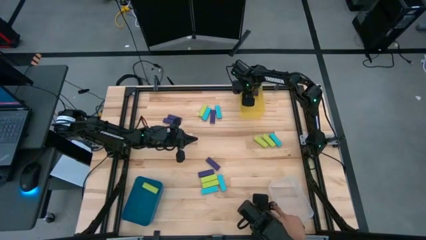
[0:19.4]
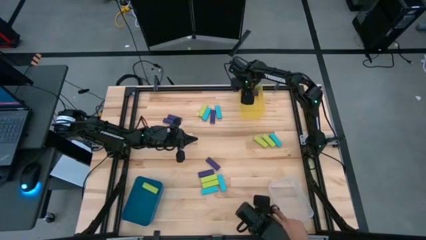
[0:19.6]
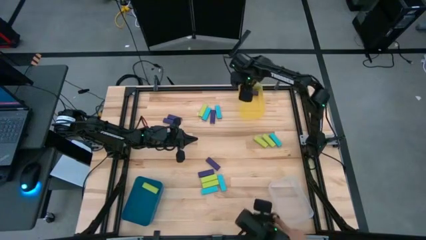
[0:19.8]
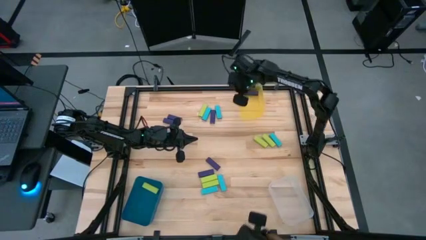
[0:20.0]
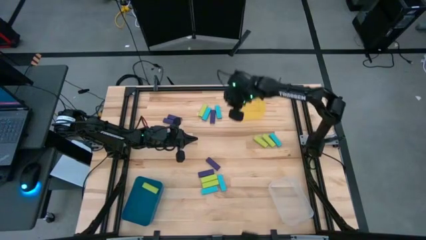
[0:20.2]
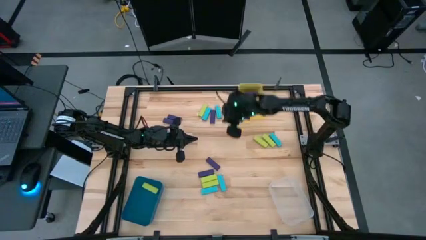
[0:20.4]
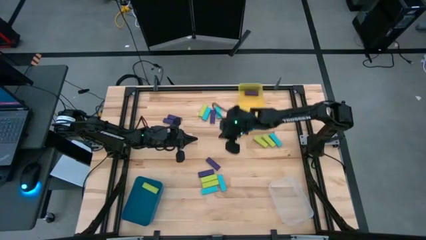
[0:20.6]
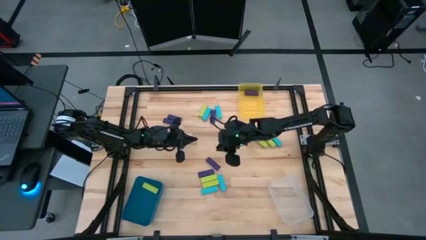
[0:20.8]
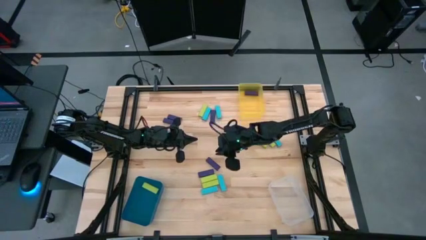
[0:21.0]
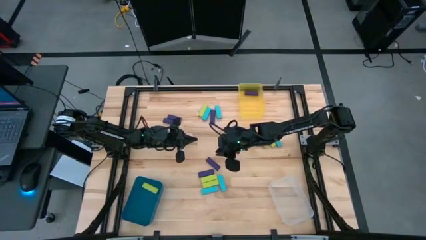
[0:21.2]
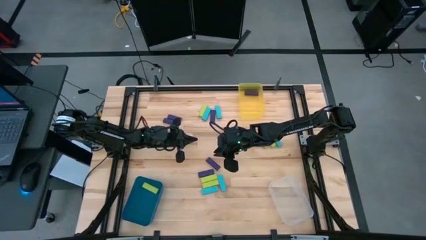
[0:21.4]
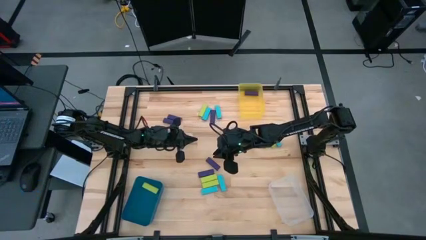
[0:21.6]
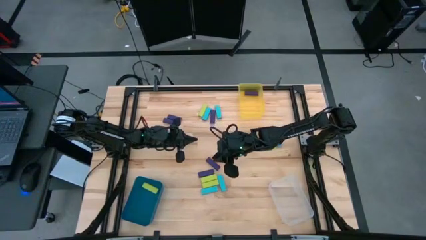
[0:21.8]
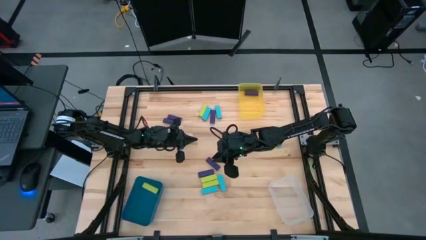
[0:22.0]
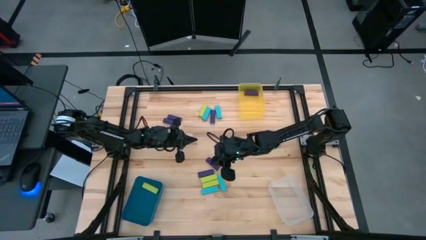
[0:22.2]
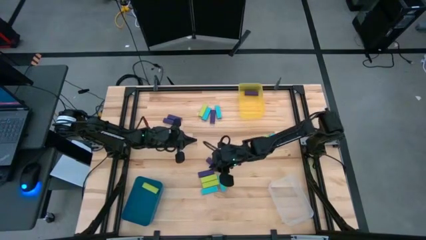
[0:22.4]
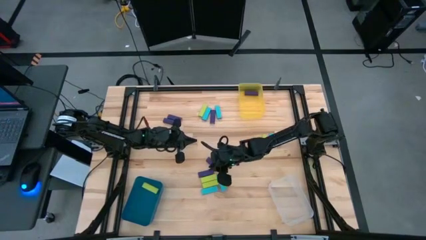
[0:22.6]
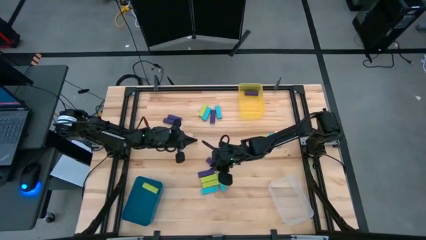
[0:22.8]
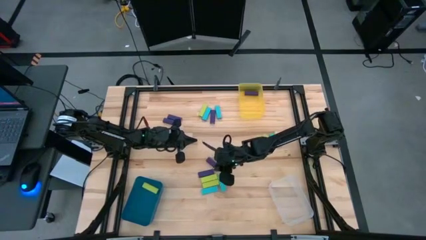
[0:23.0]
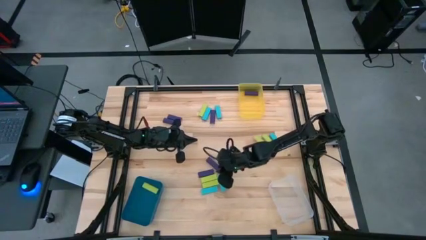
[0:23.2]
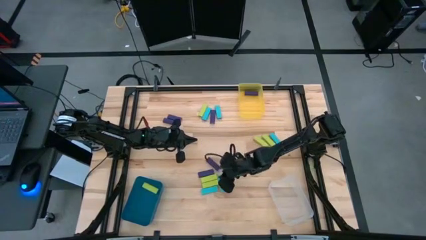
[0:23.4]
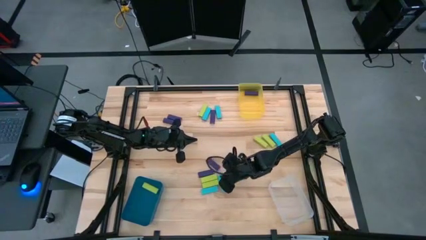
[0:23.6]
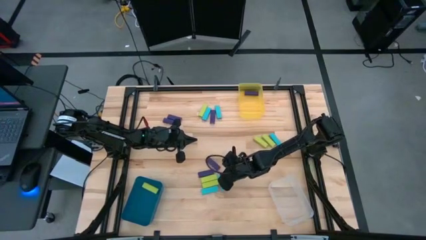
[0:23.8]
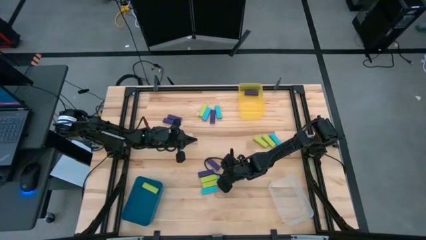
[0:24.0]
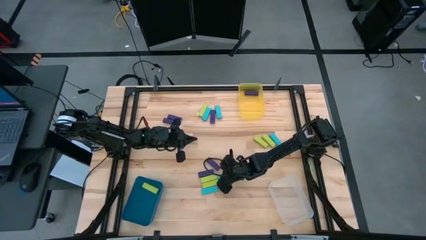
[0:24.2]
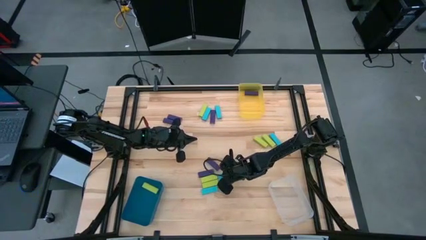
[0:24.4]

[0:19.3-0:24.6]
Task: Sort blocks
Put the light blue block into the transparent bin

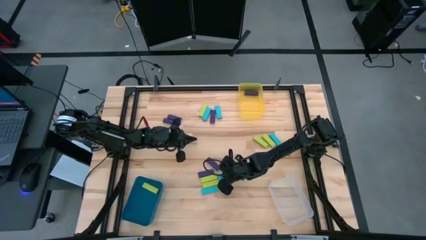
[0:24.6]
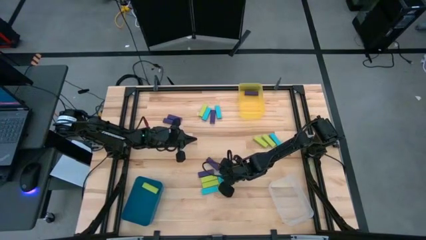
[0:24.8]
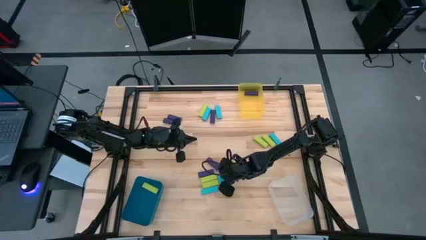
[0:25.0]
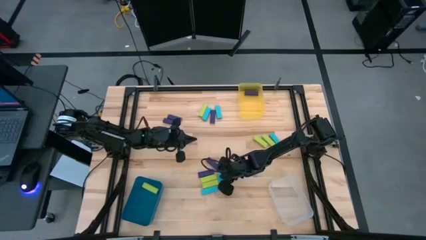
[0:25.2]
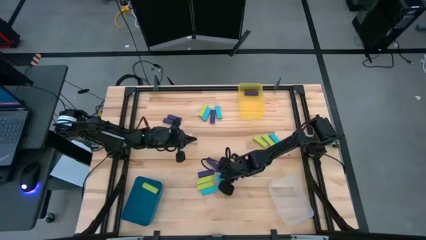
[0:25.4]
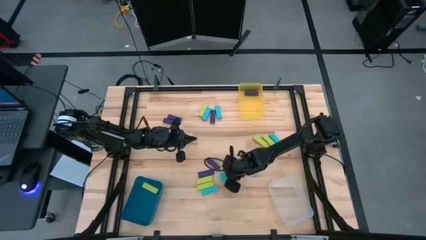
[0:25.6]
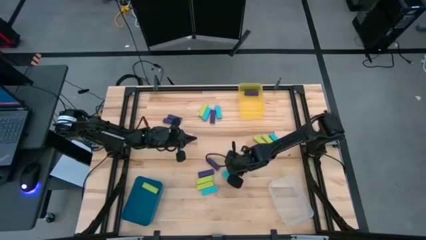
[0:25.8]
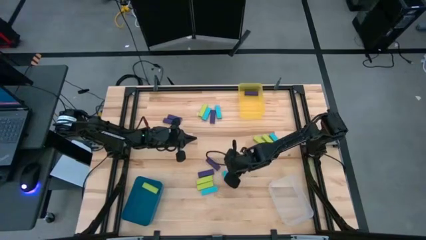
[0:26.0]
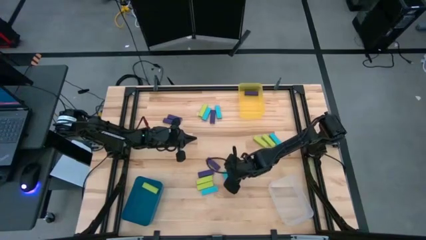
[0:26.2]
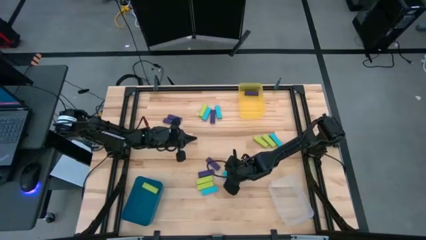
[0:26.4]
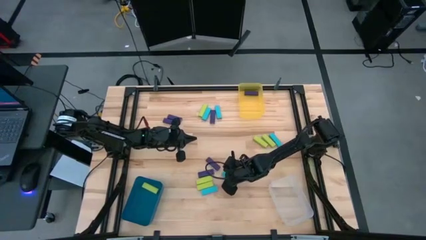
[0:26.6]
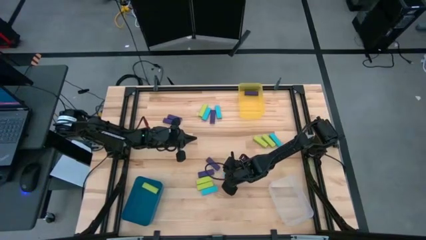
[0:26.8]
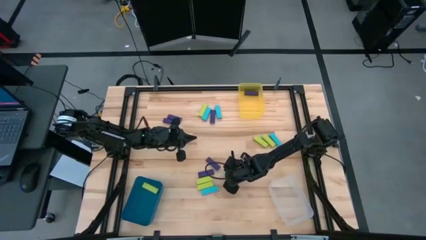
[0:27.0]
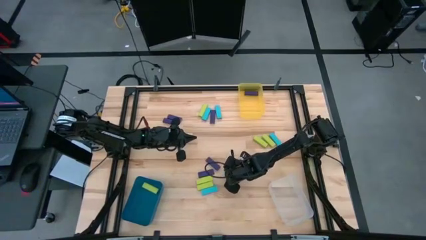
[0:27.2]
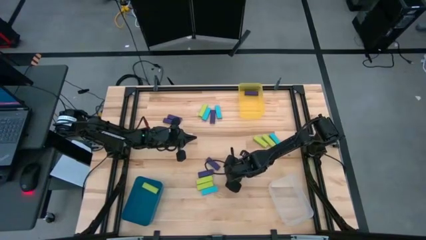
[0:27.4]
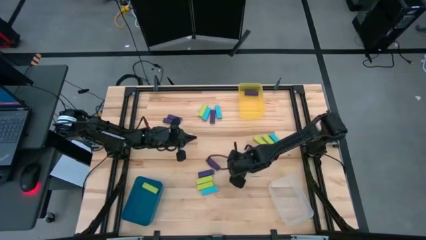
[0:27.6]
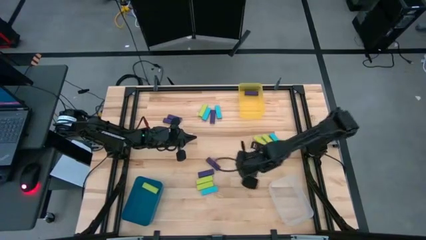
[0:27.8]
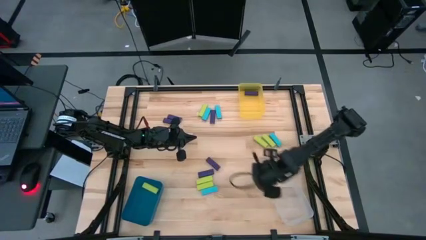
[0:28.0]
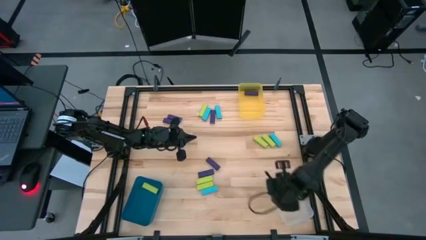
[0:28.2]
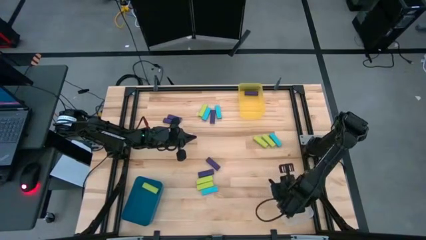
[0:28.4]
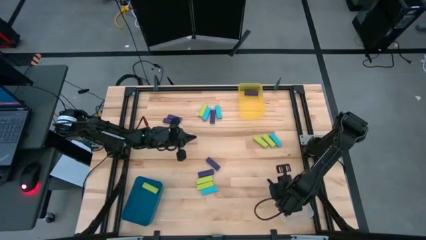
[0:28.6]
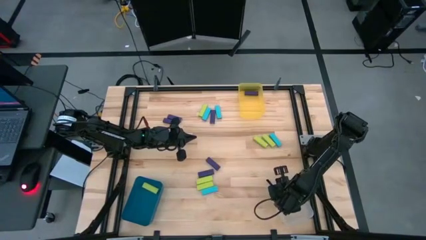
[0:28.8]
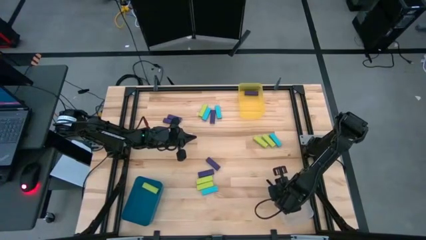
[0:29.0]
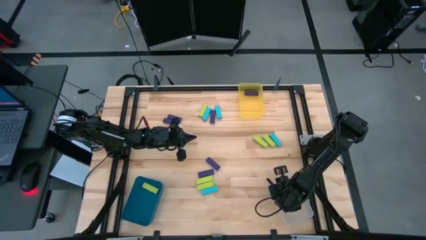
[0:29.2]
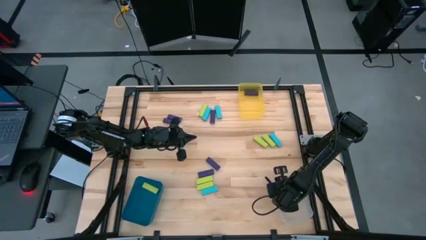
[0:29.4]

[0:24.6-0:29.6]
Put the light blue block into the transparent bin

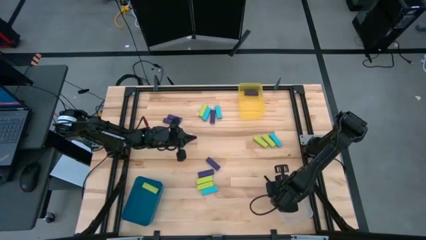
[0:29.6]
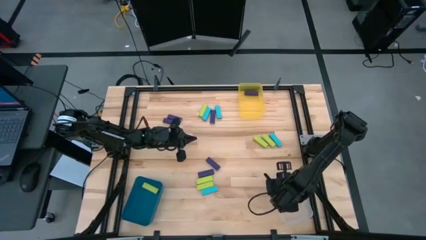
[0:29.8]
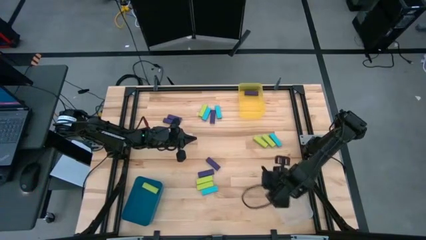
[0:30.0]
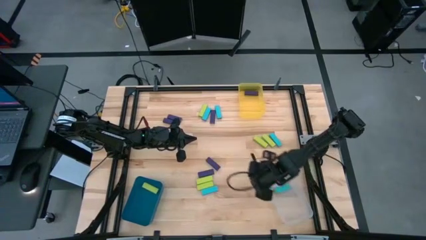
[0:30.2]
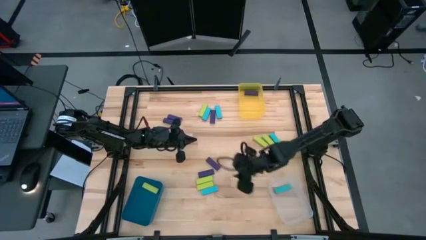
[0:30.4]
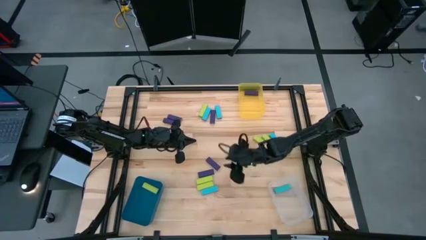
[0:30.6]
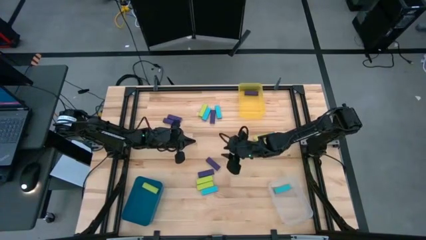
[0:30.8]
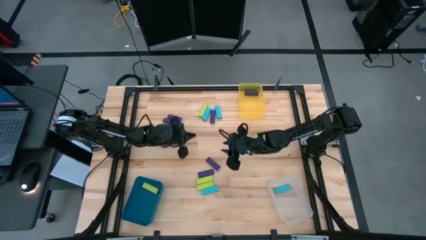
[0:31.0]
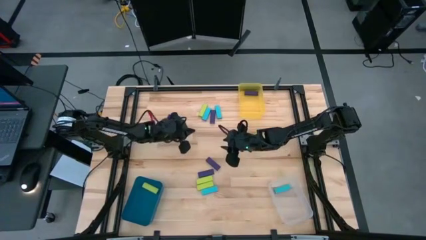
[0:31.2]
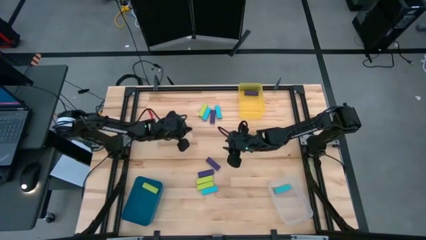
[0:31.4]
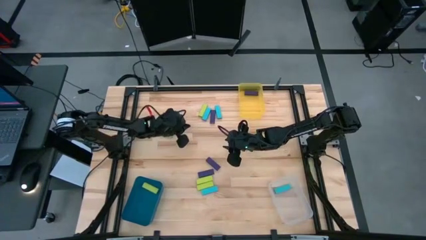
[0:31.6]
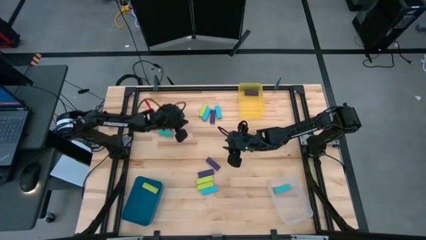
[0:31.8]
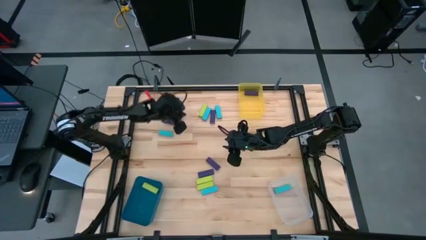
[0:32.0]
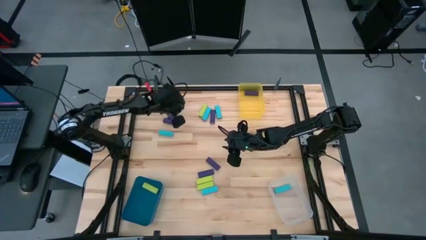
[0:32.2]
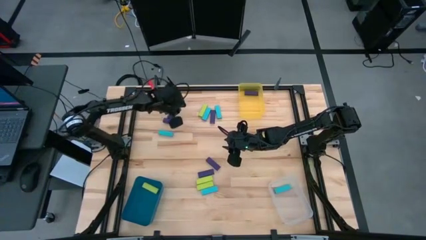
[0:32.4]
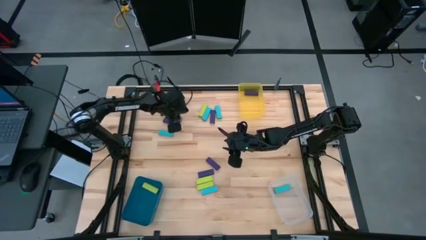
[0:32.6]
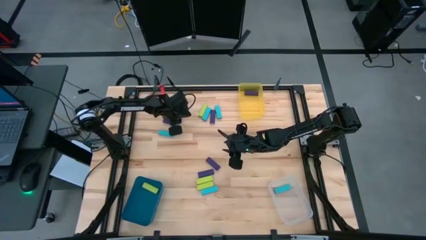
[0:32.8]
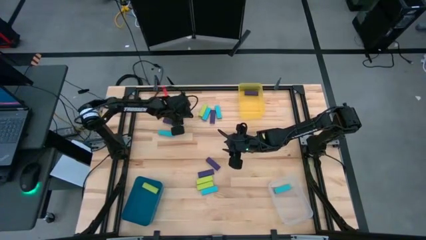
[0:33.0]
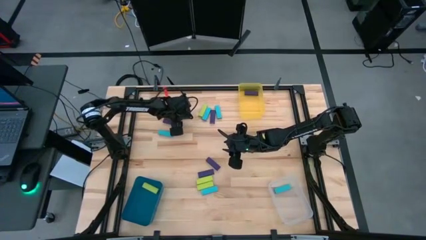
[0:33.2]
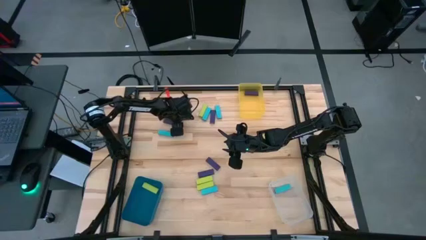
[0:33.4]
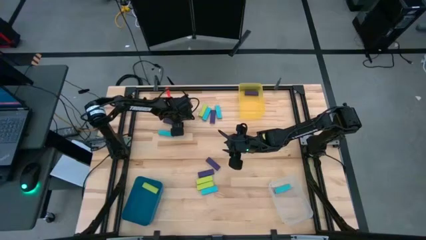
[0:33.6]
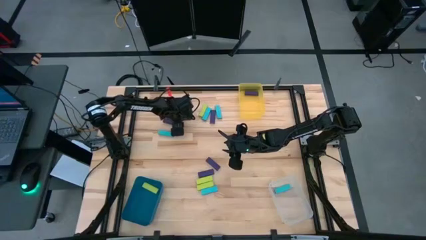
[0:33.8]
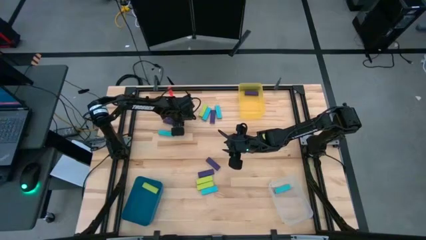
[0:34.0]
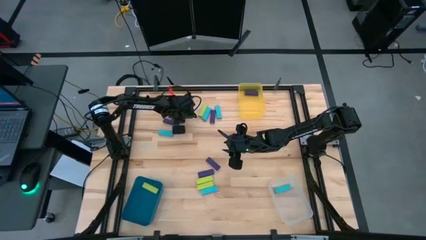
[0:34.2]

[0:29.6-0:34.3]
Put the violet block into the transparent yellow bin
